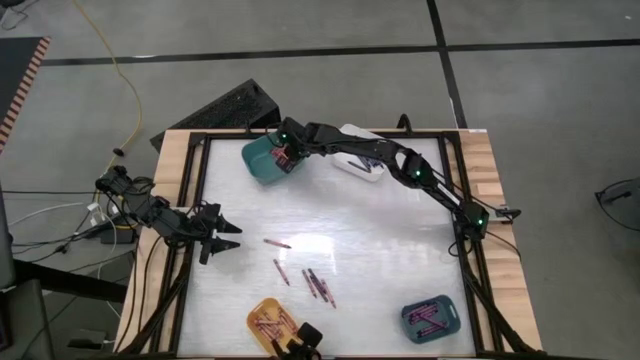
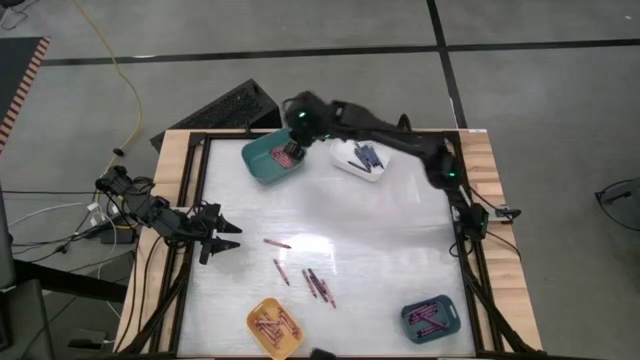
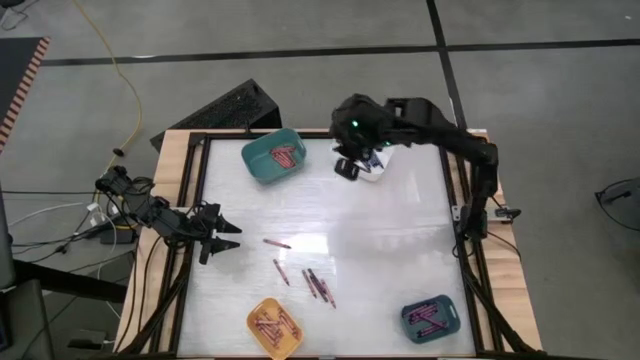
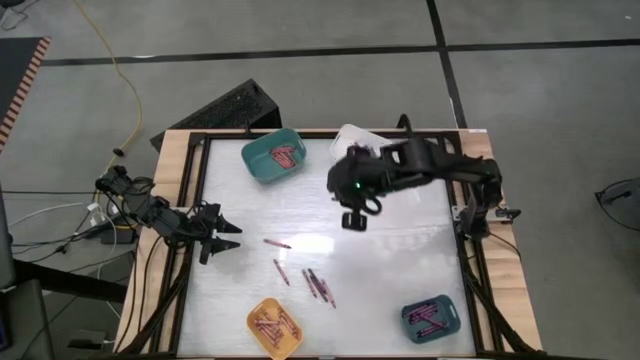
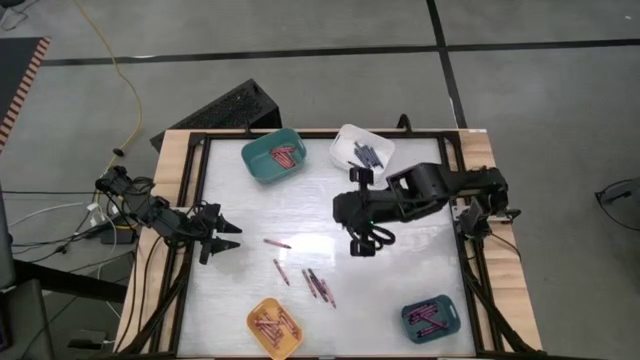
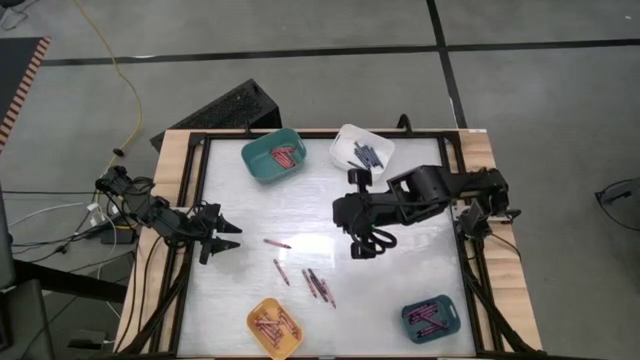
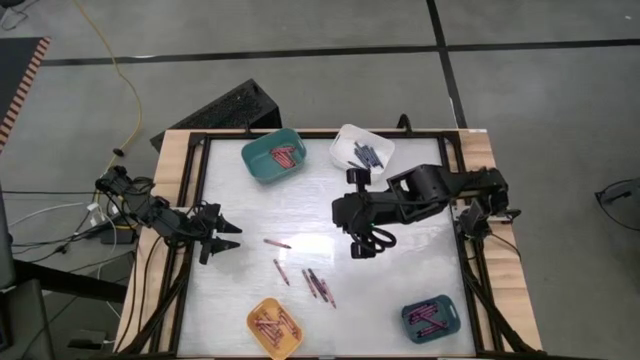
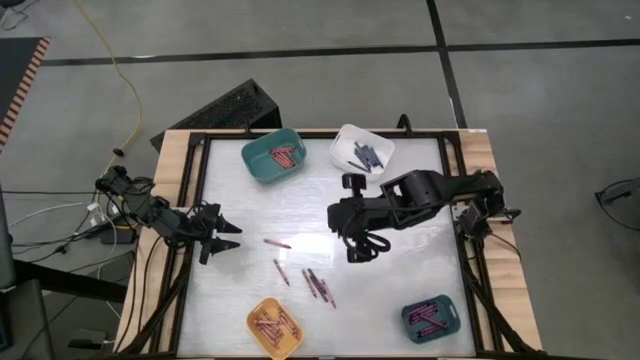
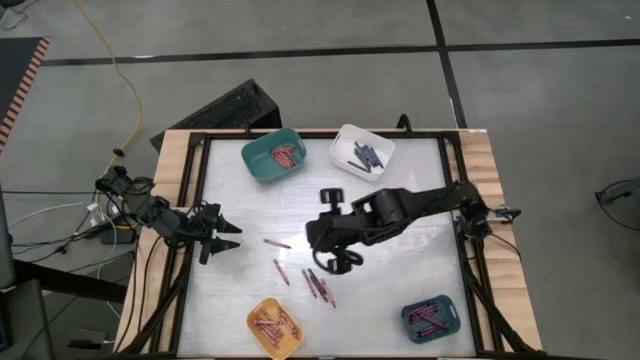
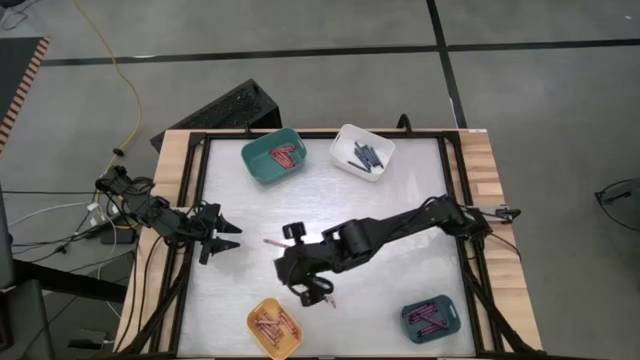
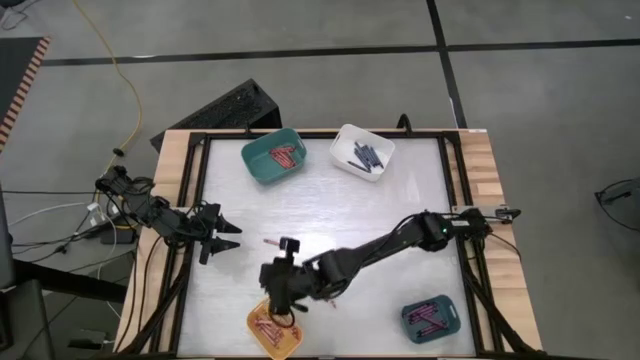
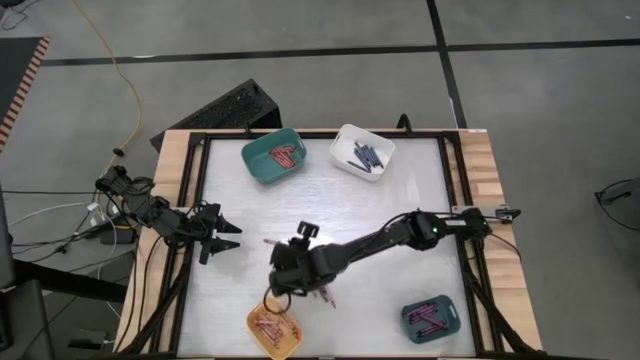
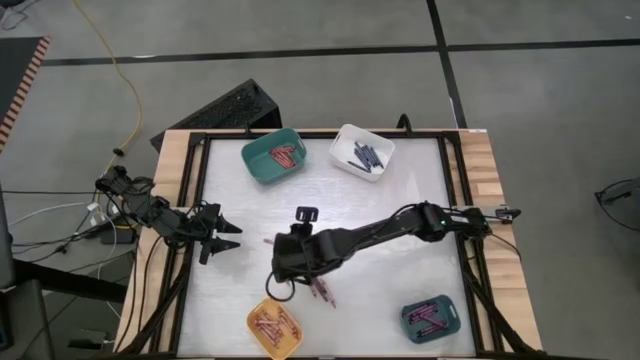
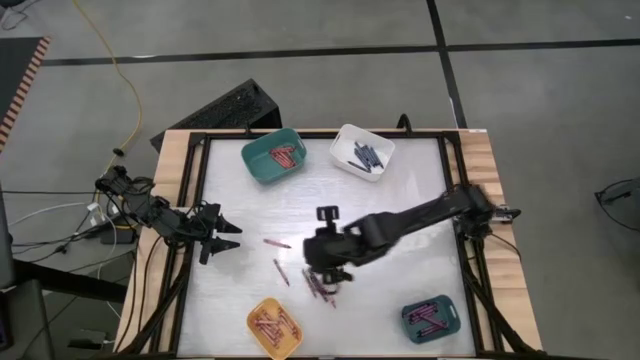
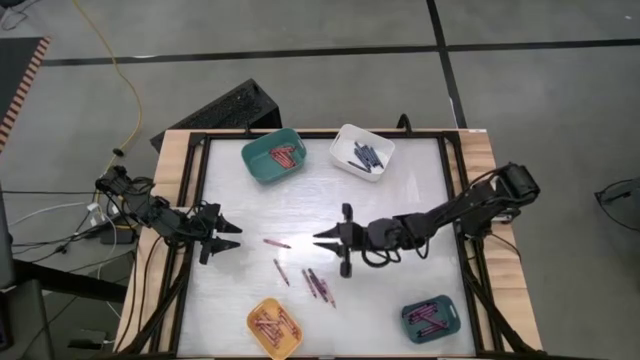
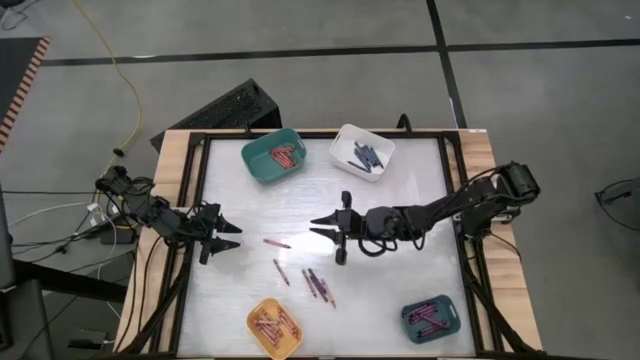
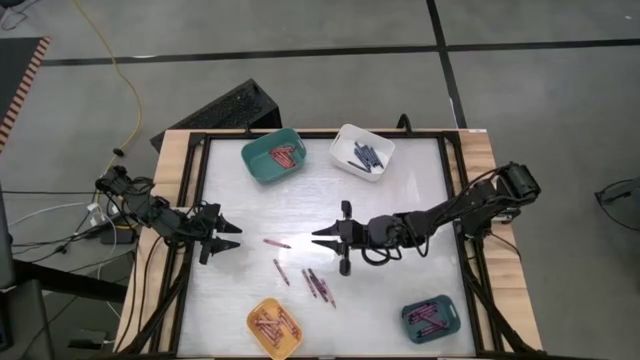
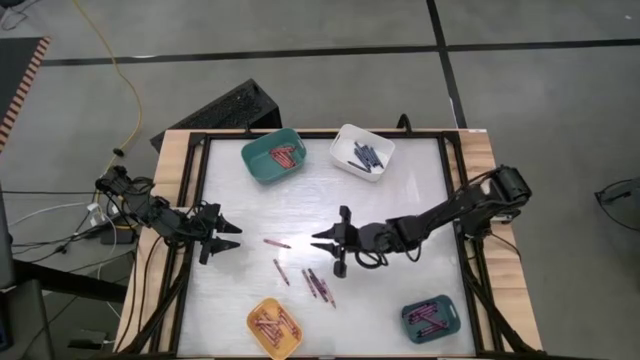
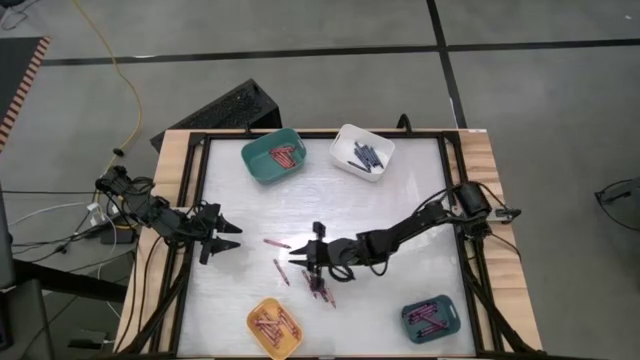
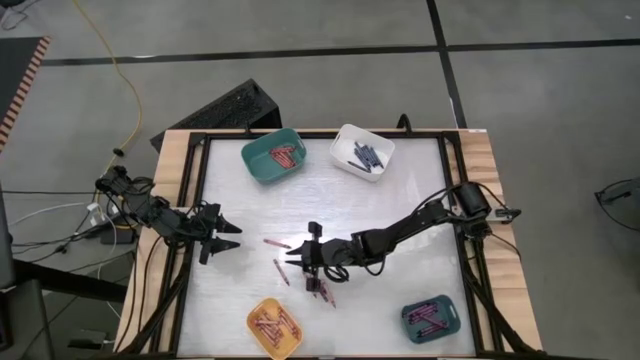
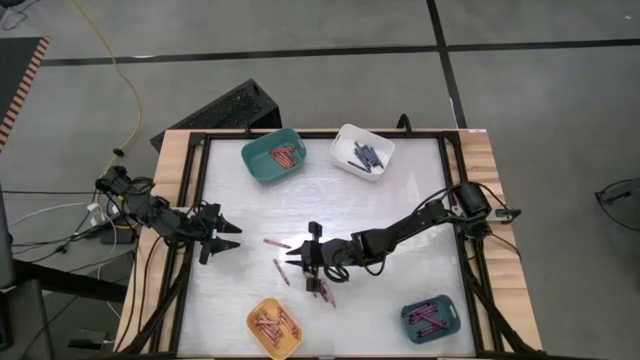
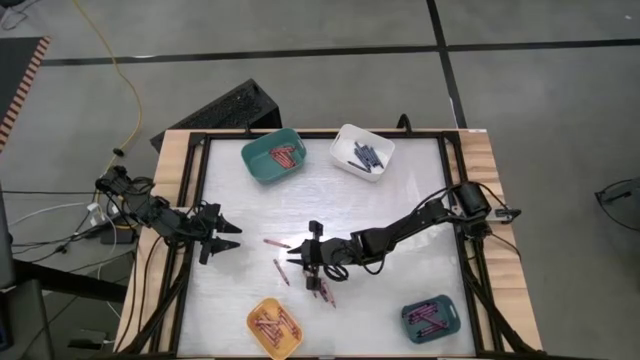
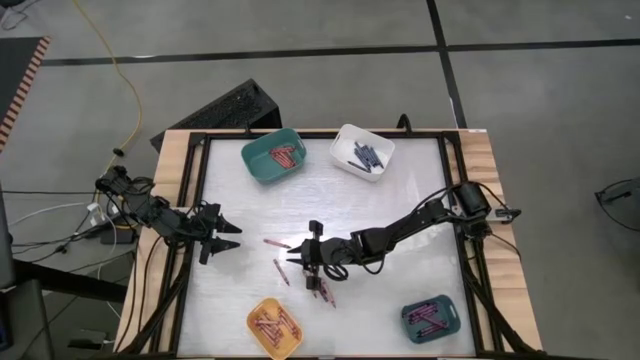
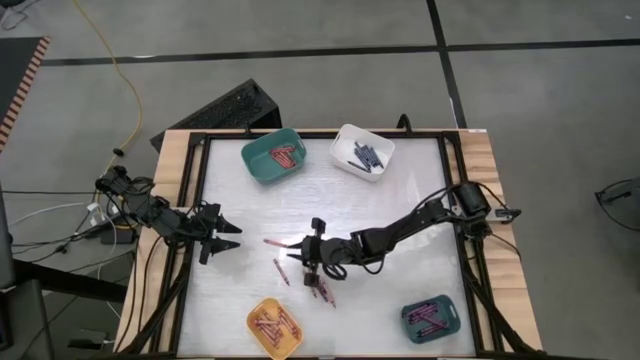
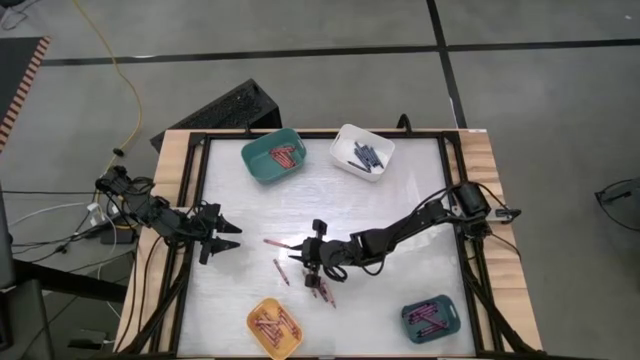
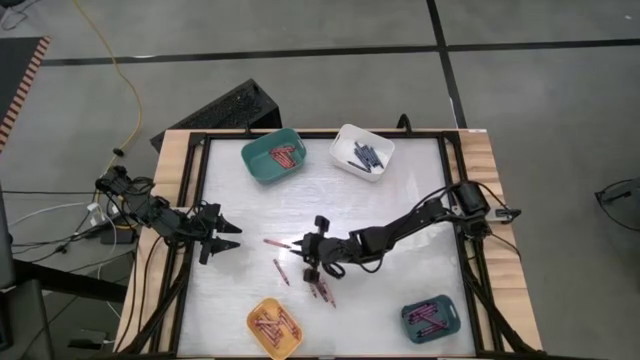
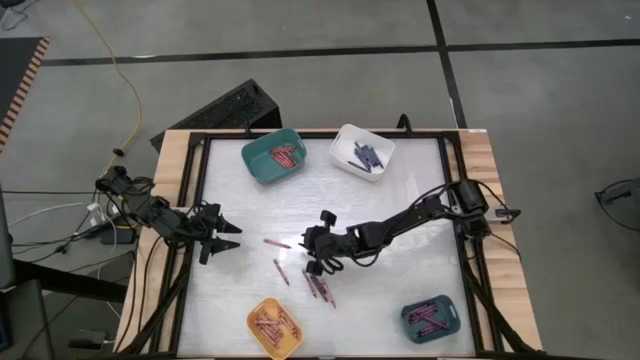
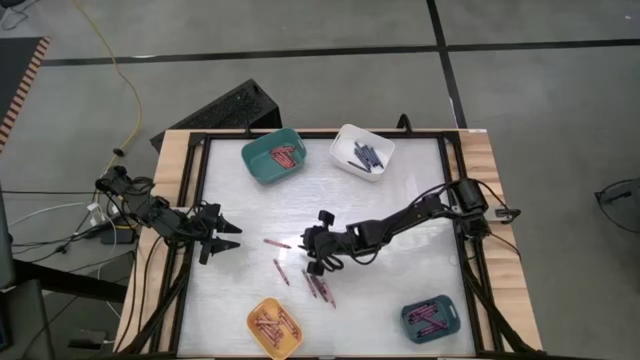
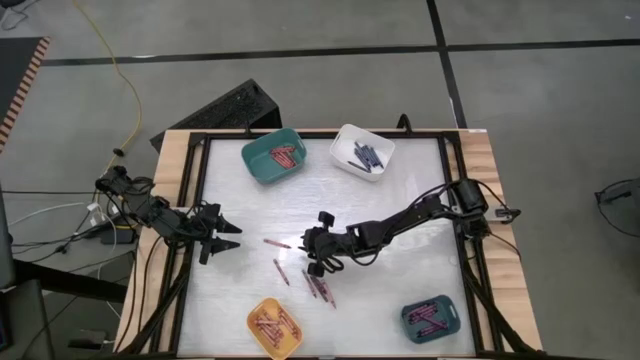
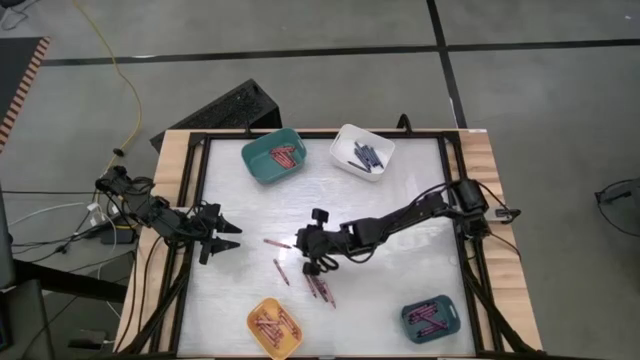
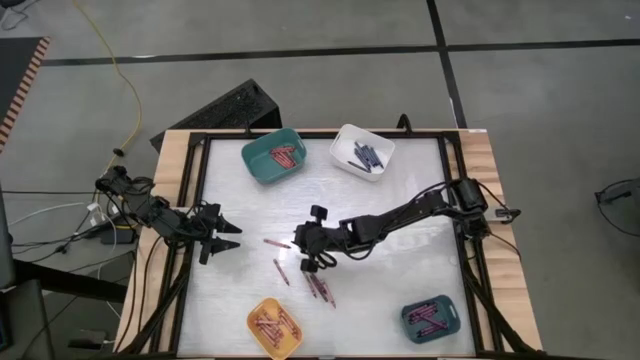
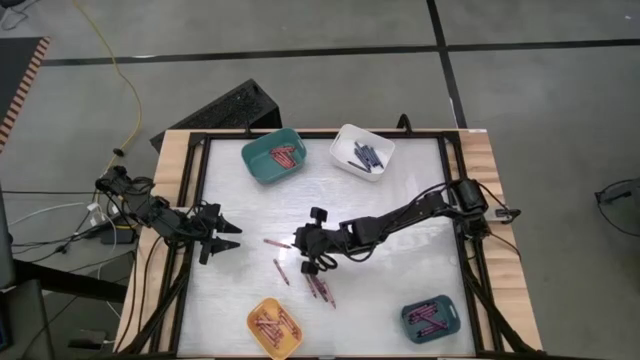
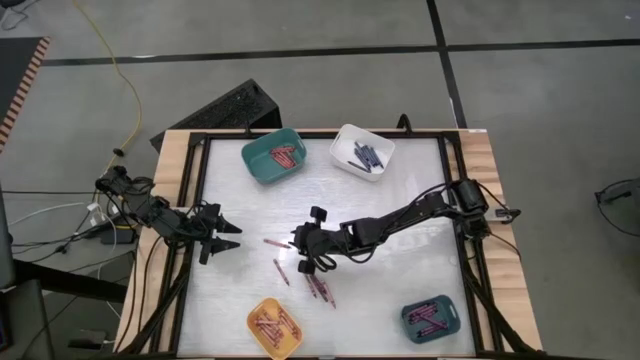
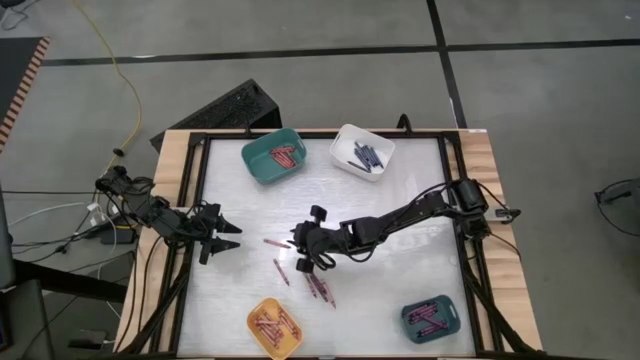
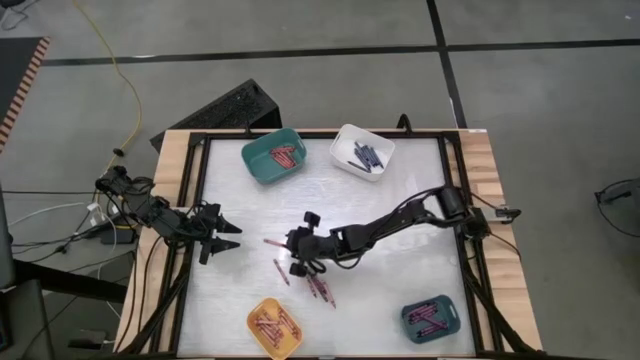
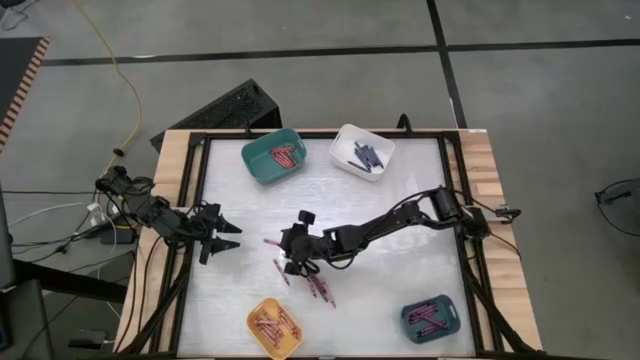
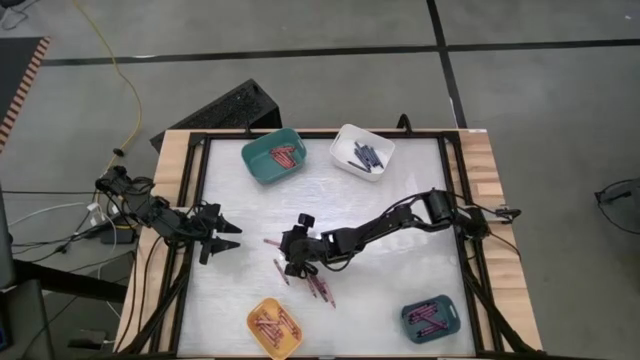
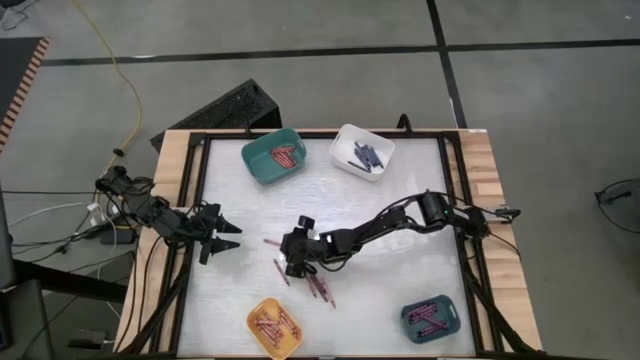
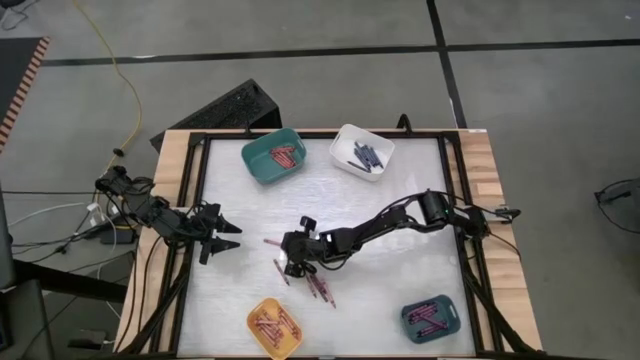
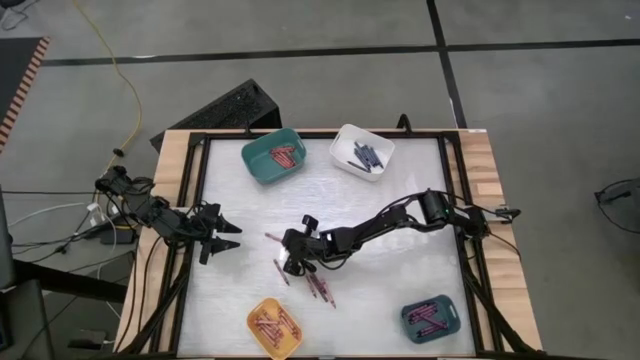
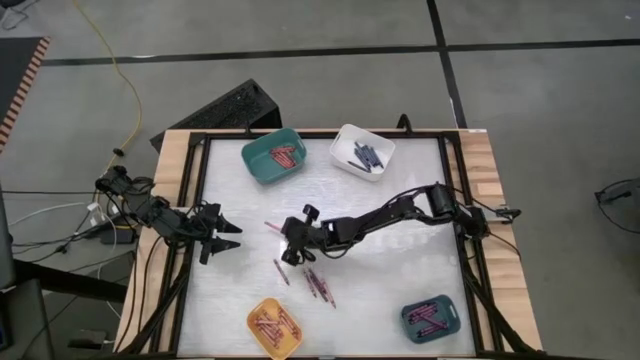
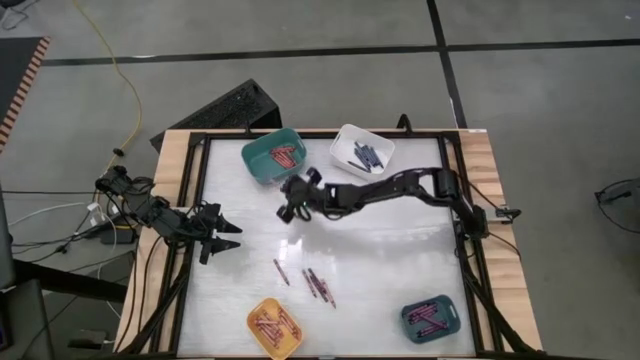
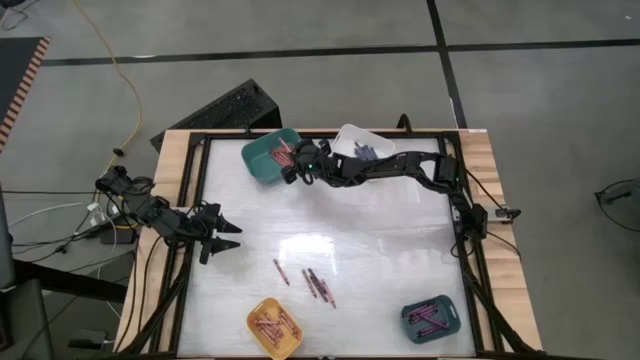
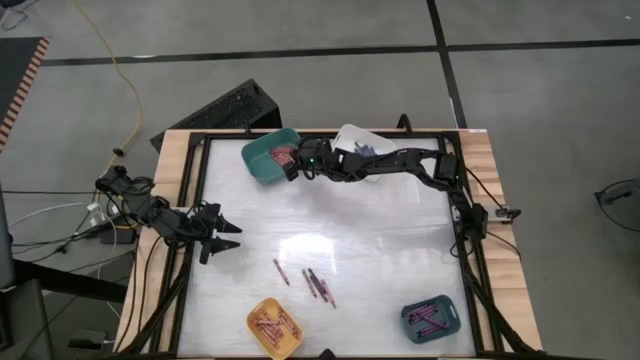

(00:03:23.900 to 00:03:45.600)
Task: Sort crayons
Put the red crayon into the top green bin
